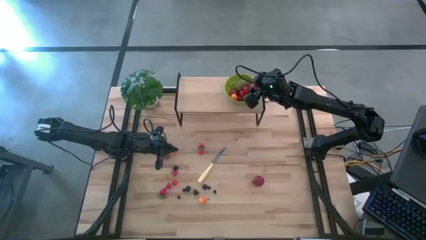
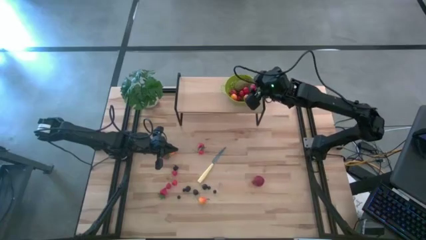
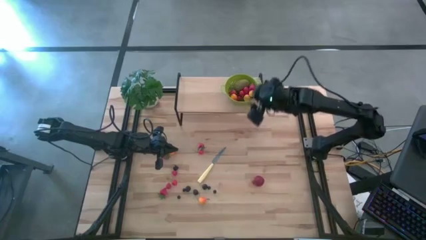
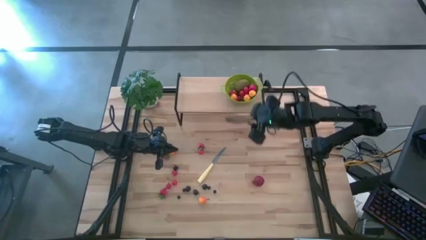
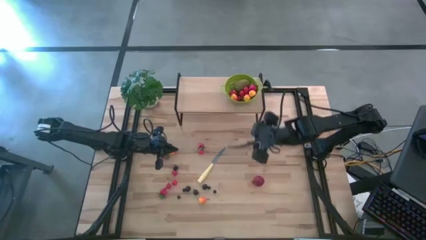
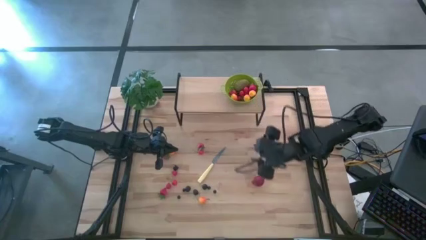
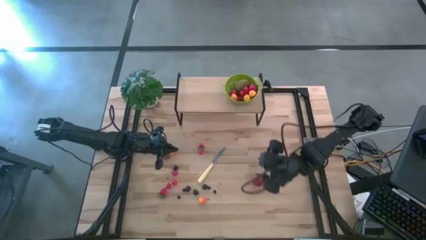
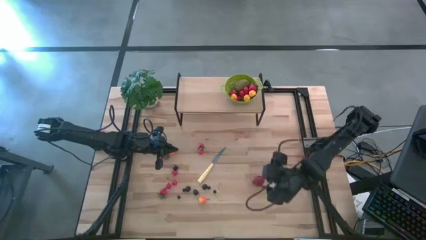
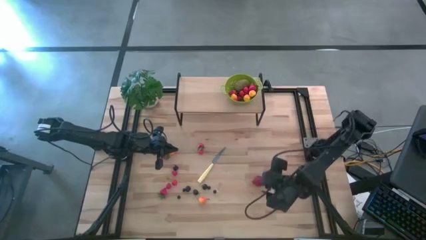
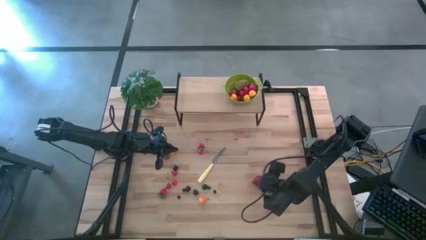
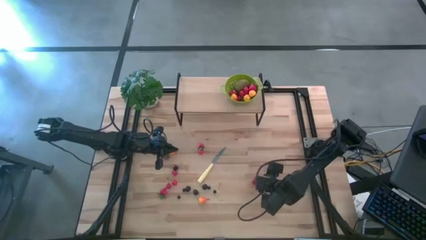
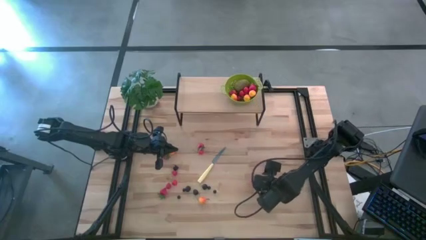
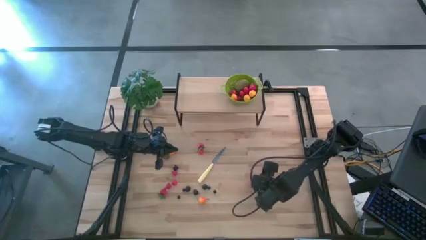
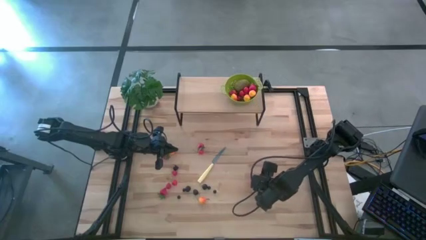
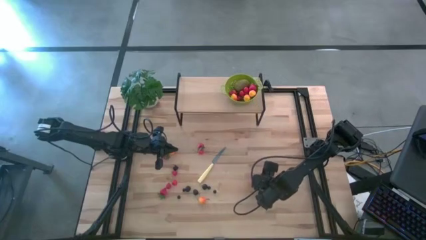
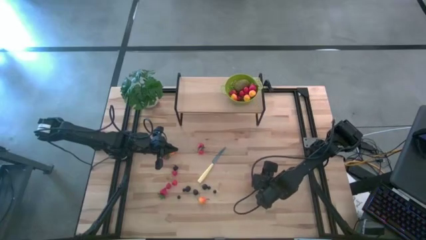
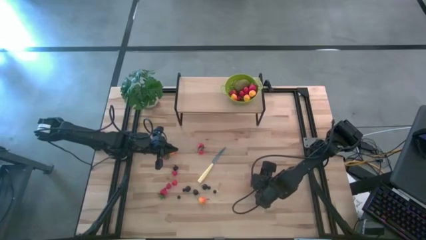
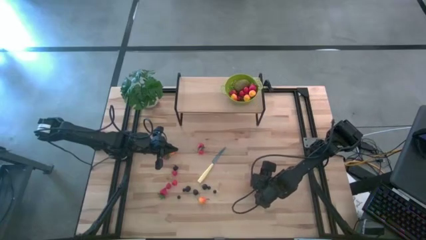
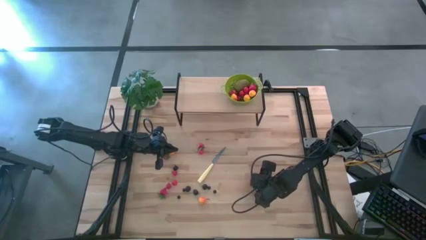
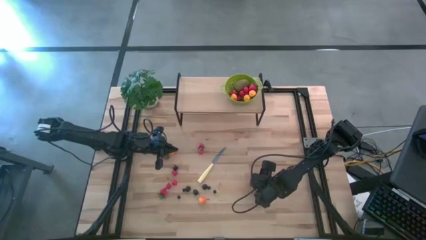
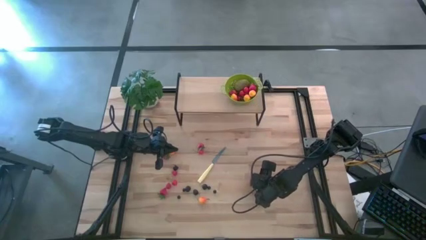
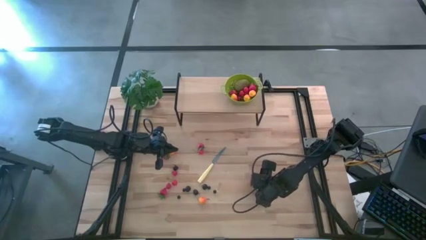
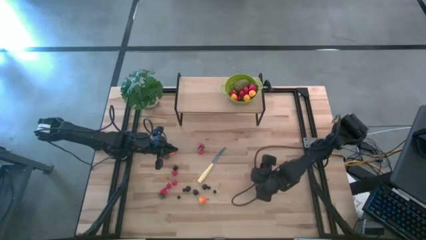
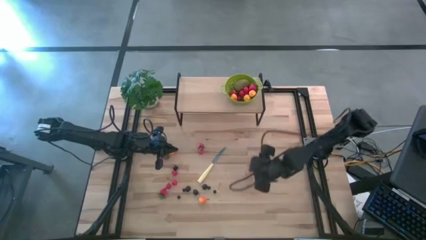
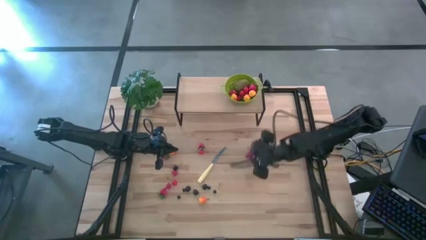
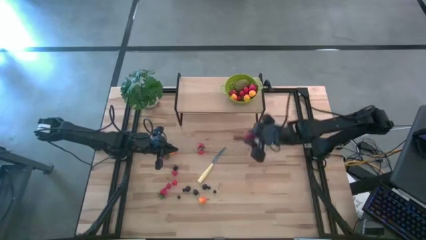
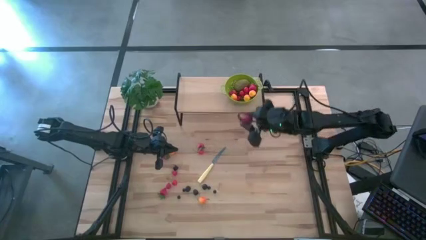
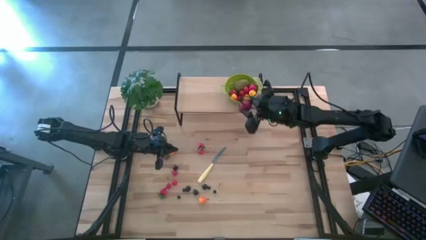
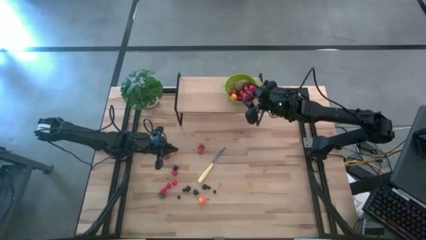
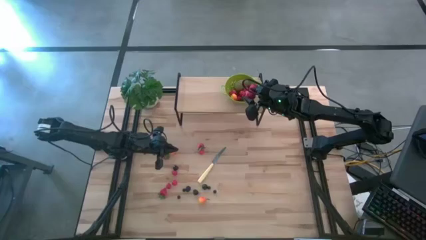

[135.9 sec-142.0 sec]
Task: Pick & Place Fruit
Put the pomegranate into the strainer bowl

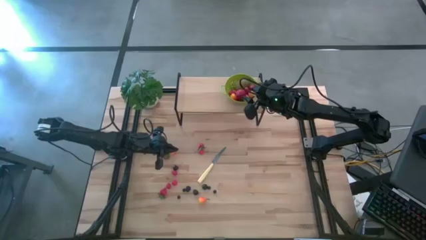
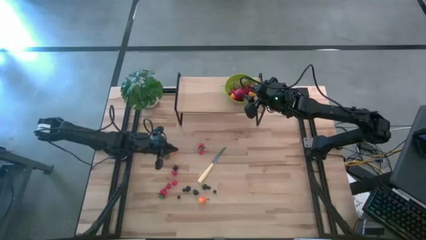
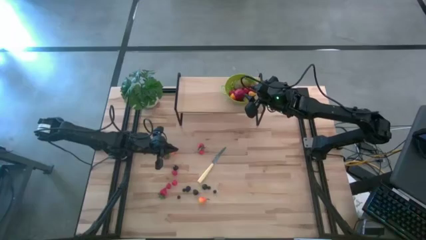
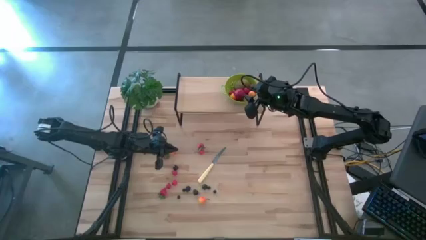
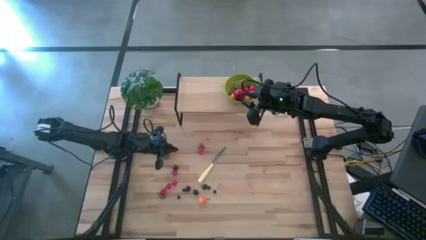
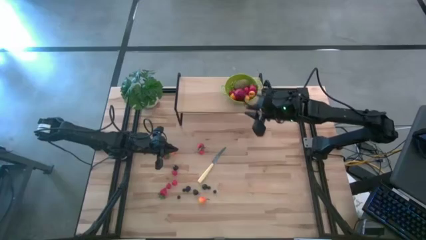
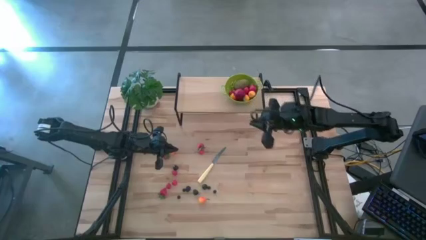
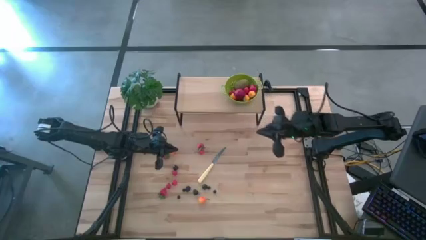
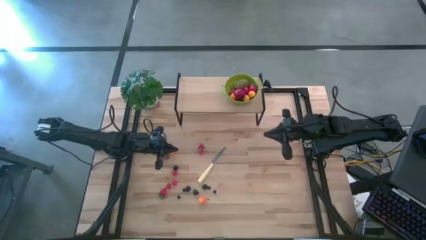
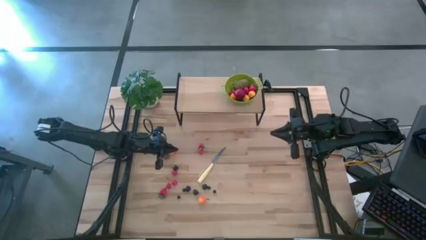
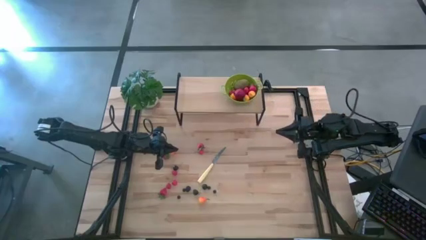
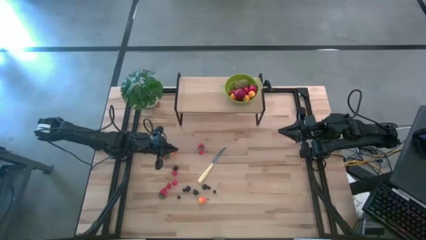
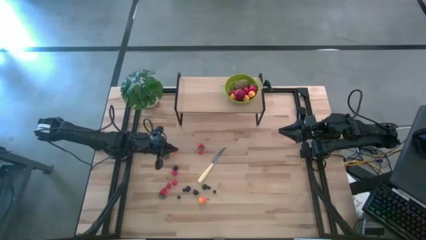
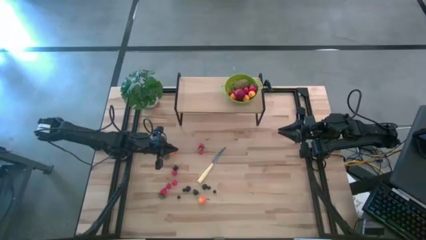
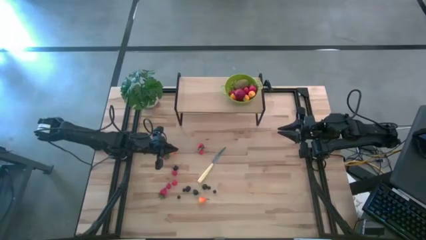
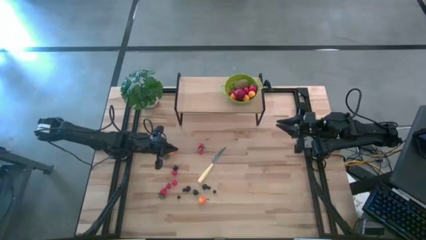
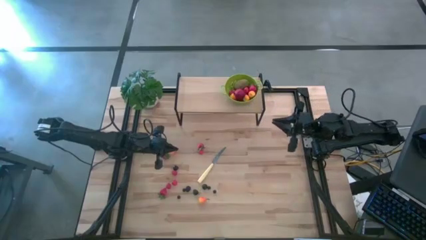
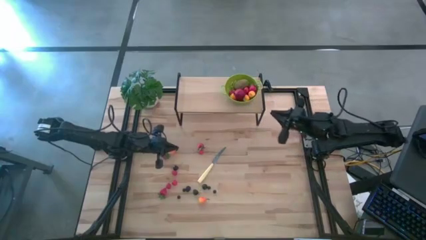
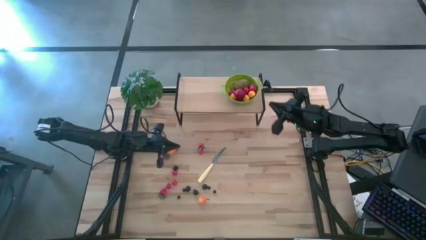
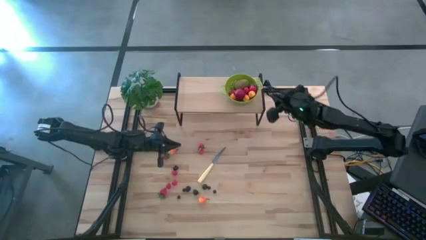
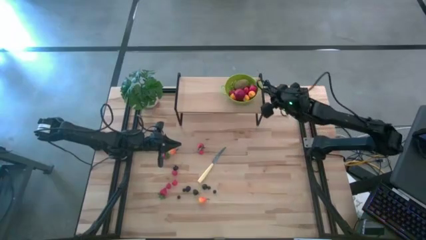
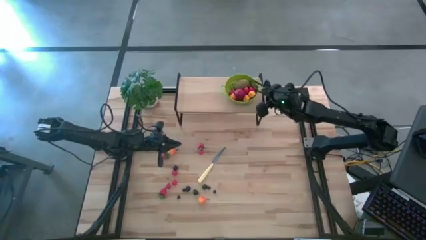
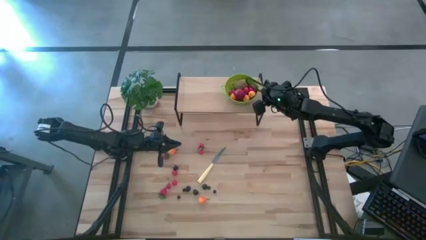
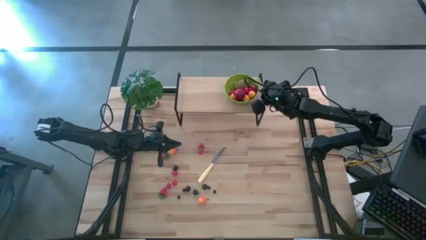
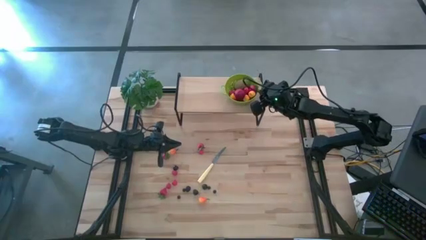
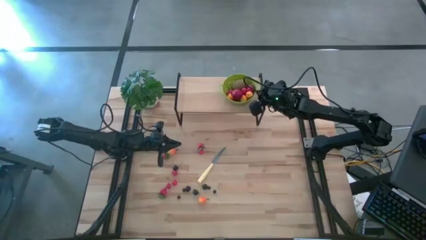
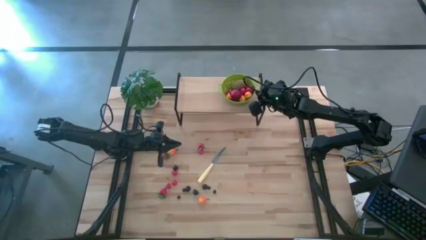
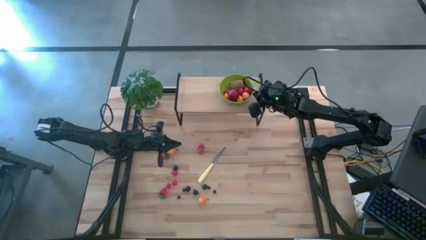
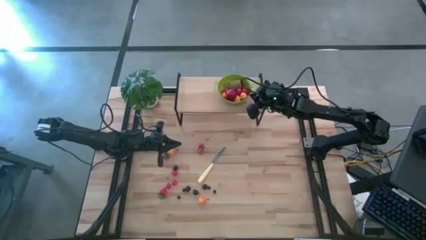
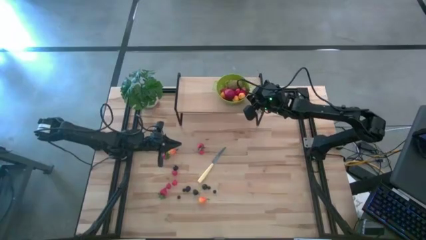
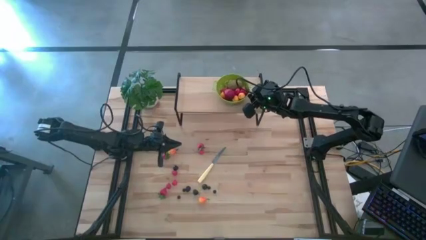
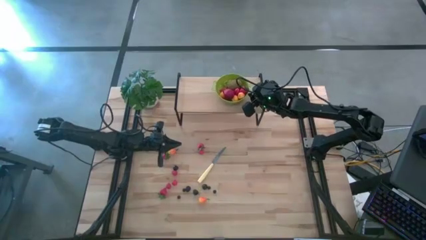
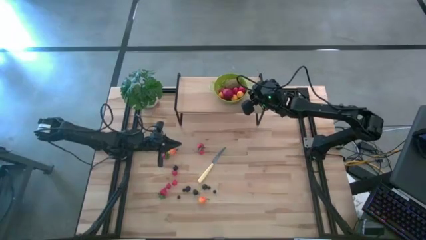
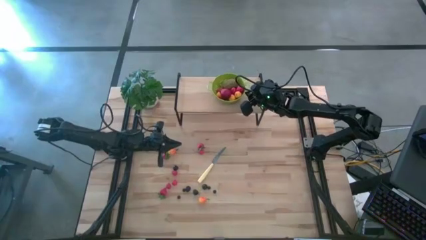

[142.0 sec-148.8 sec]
Adjust th strainer bowl on the shelf

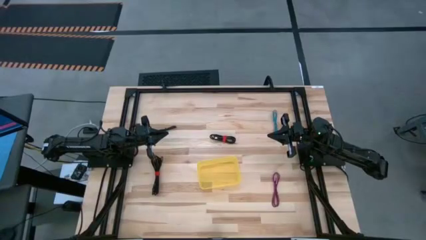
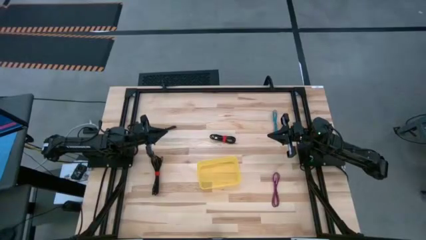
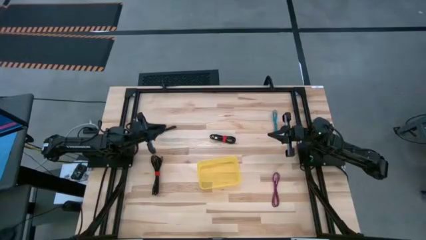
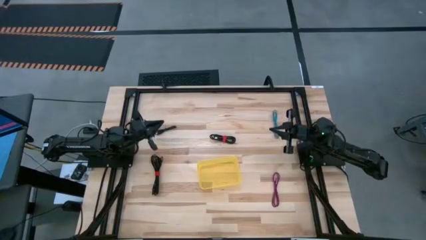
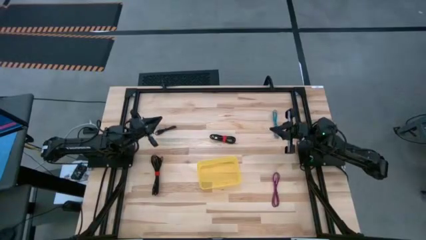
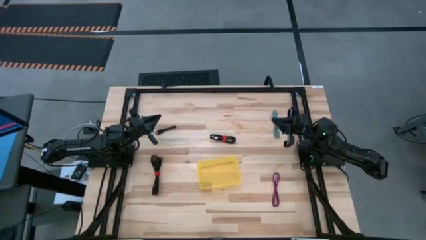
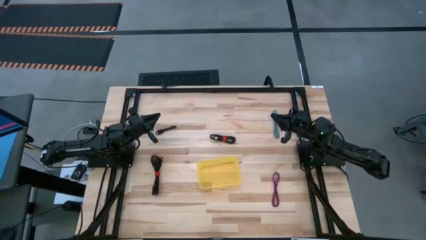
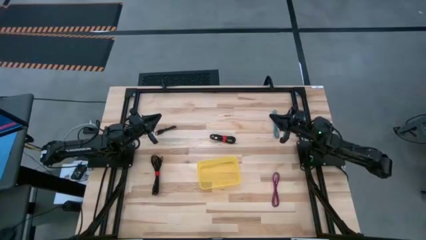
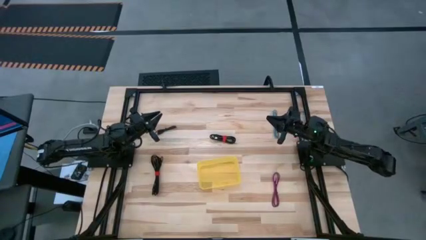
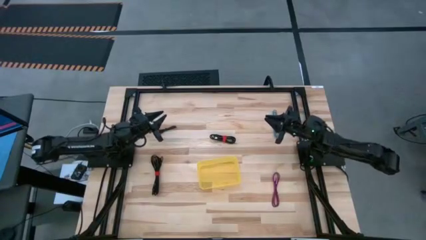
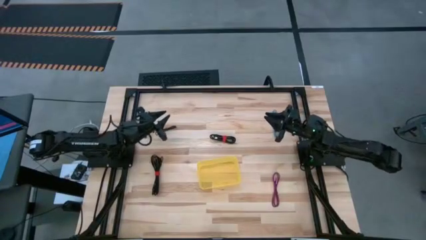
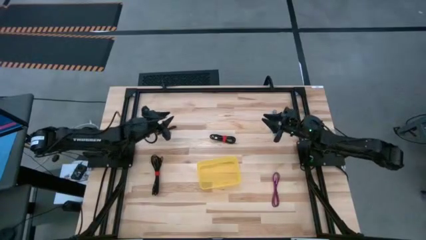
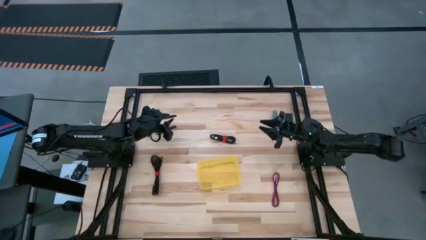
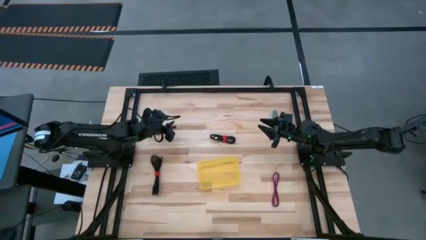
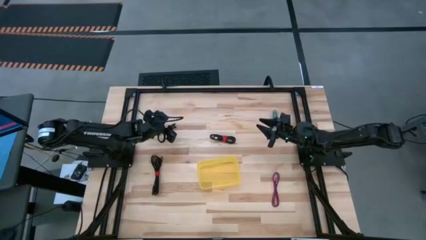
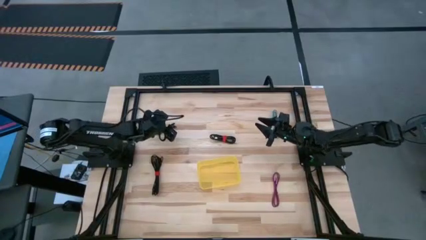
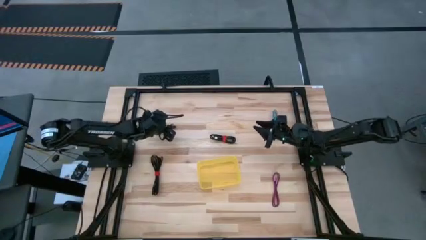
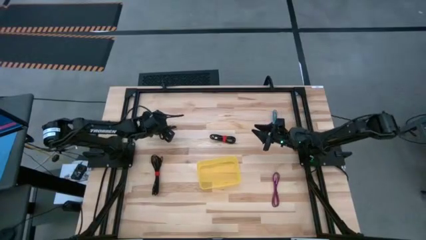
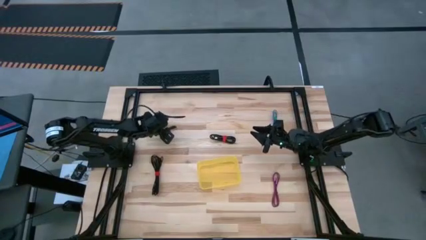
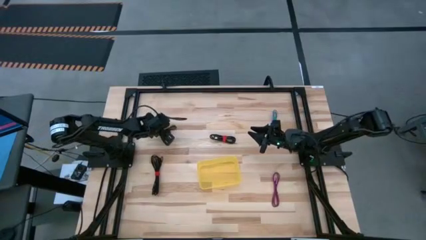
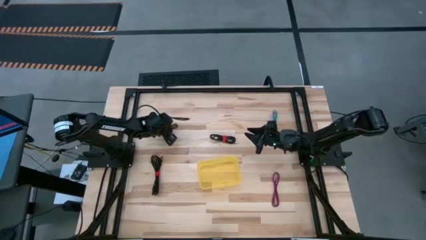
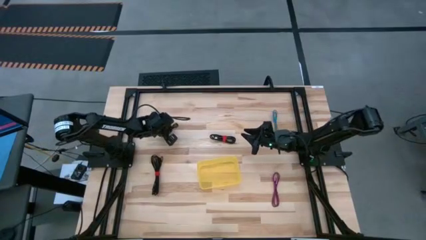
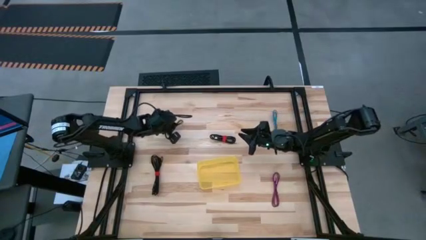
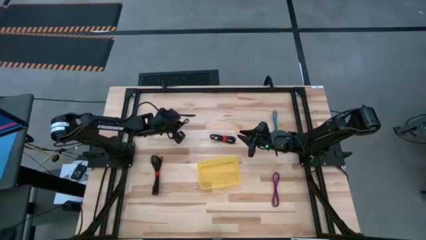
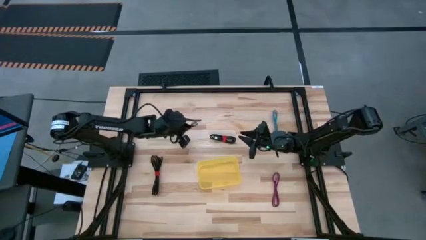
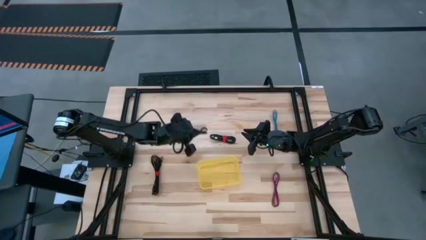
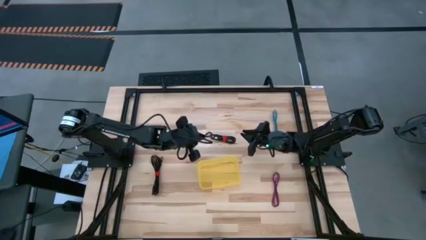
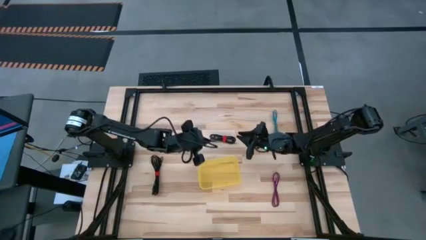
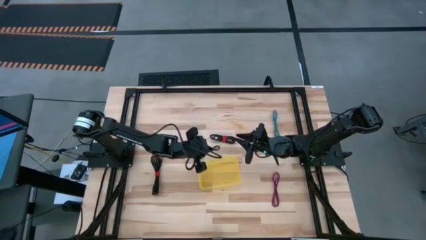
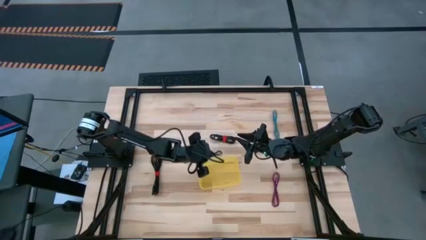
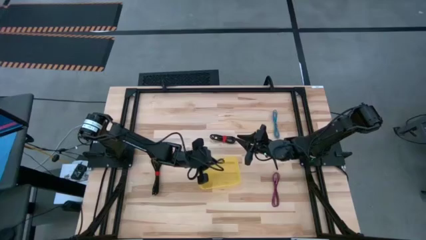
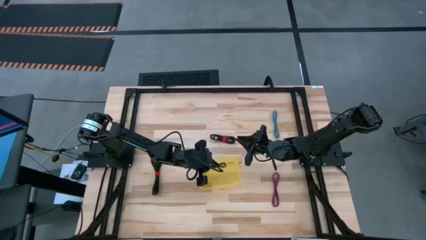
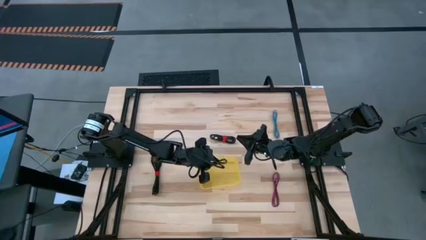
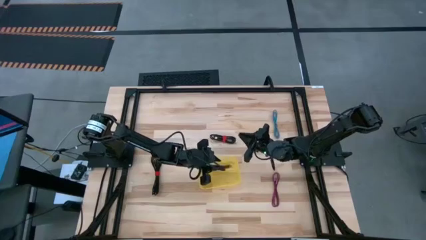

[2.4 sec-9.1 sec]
Task: Pick and place USB-C Cables
Put the top left black charger cable into the yellow bin
